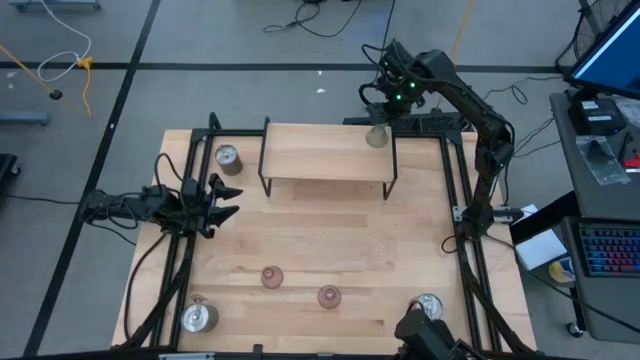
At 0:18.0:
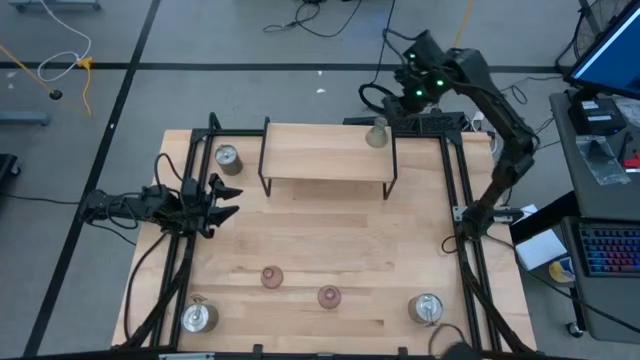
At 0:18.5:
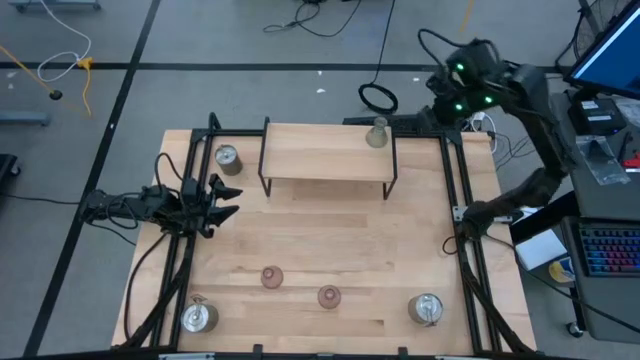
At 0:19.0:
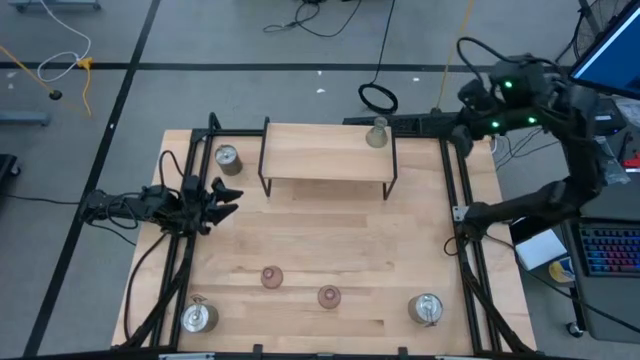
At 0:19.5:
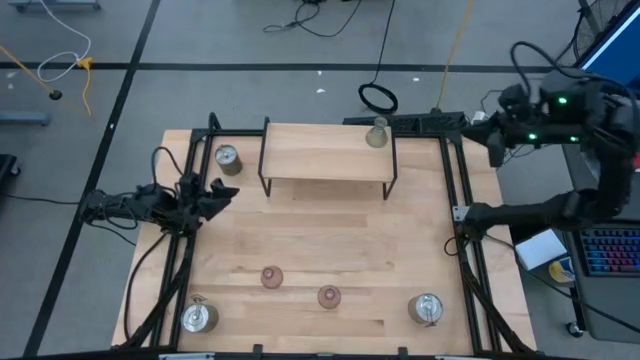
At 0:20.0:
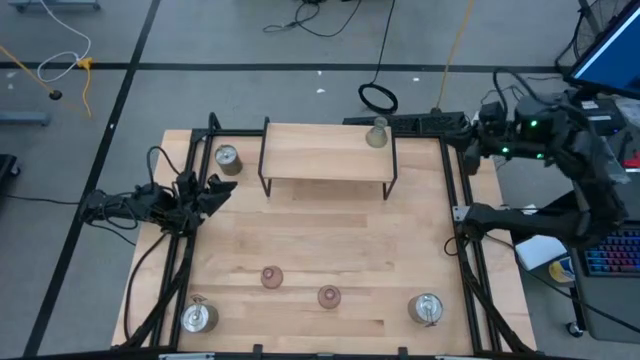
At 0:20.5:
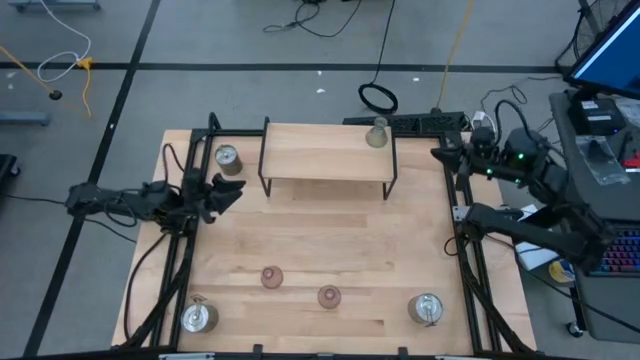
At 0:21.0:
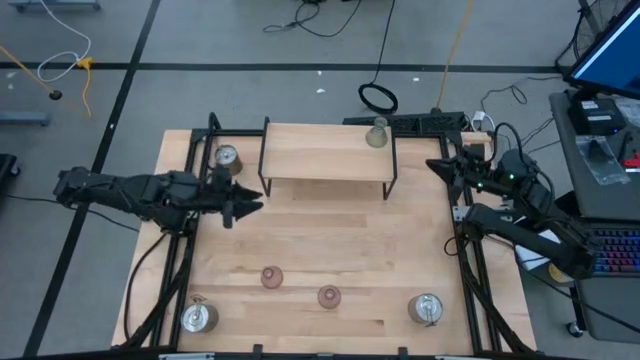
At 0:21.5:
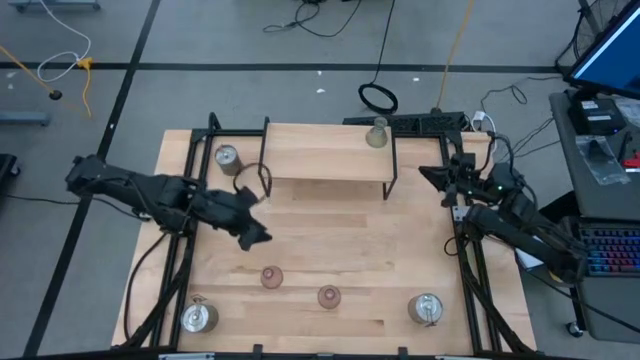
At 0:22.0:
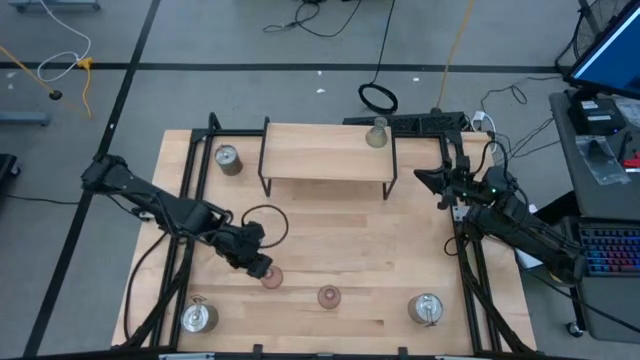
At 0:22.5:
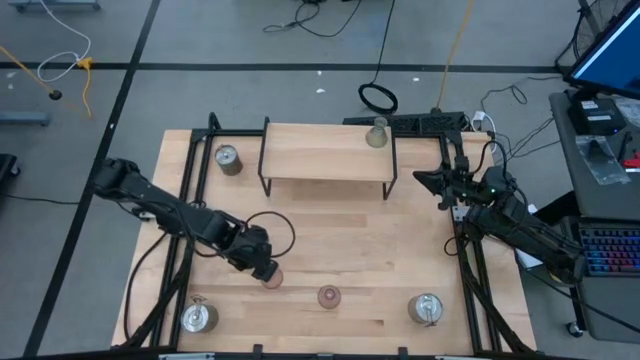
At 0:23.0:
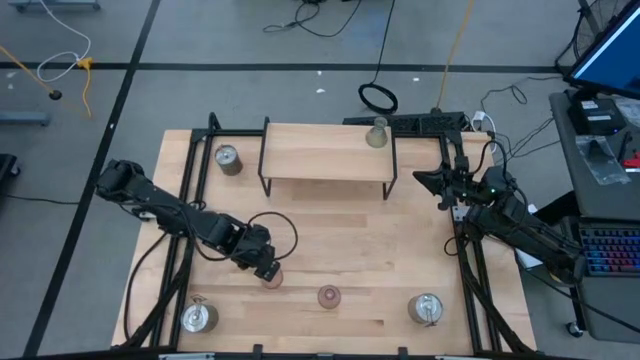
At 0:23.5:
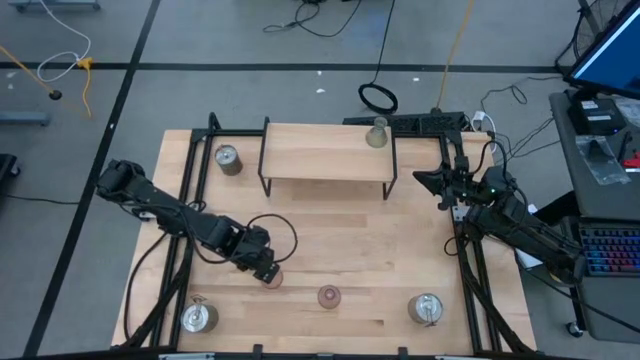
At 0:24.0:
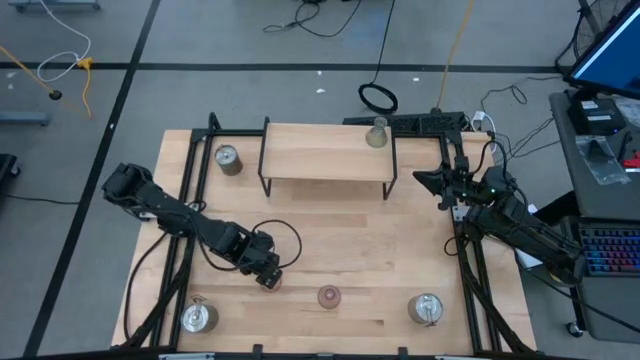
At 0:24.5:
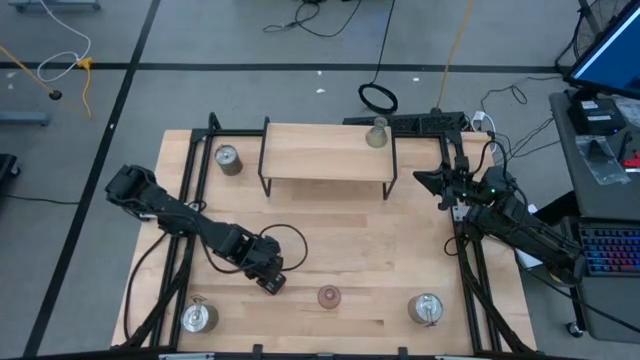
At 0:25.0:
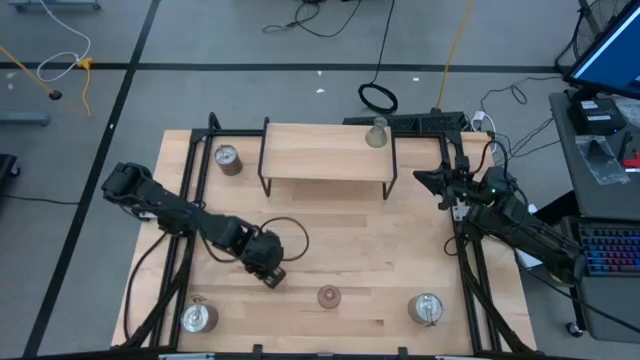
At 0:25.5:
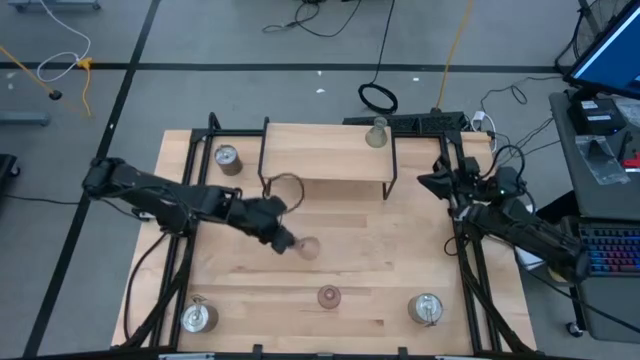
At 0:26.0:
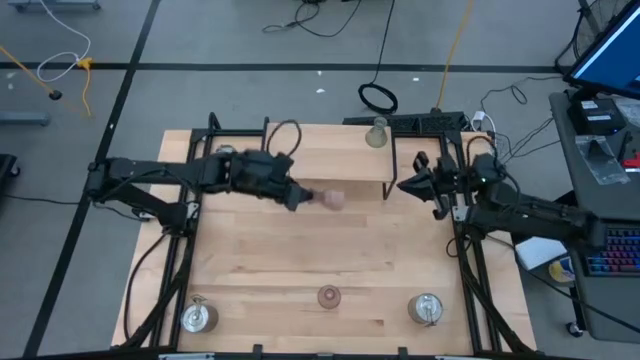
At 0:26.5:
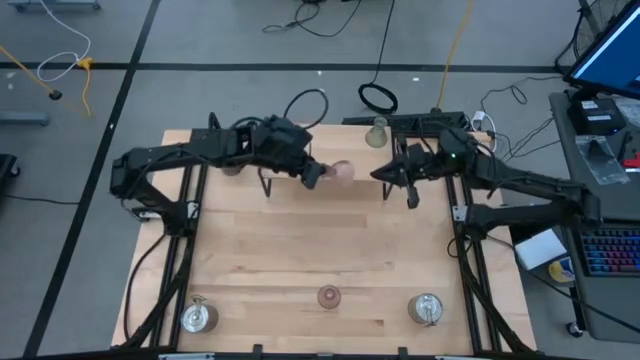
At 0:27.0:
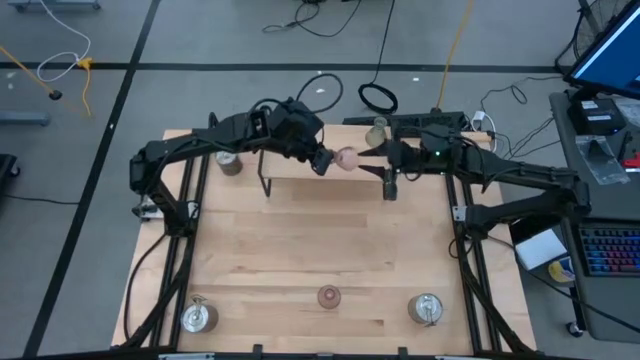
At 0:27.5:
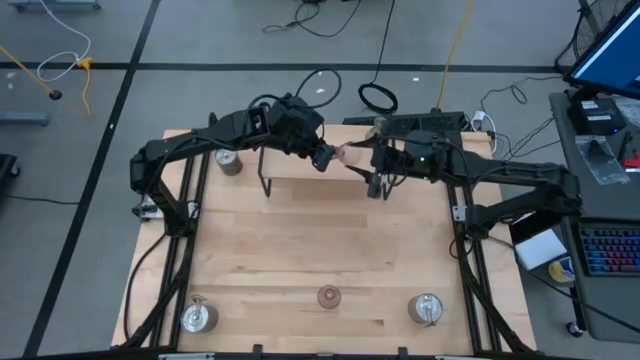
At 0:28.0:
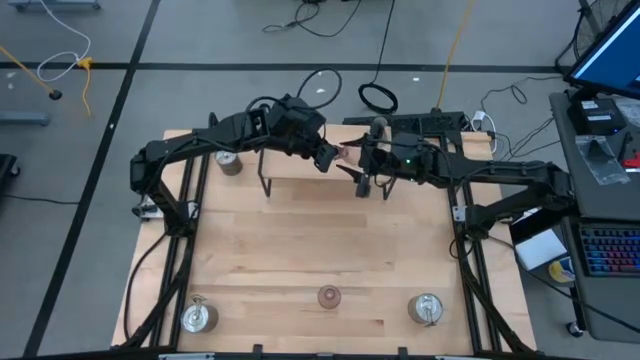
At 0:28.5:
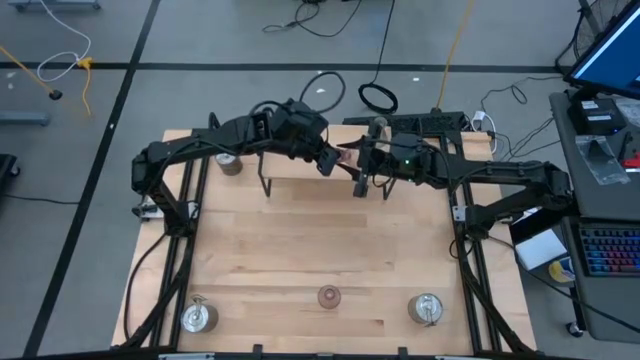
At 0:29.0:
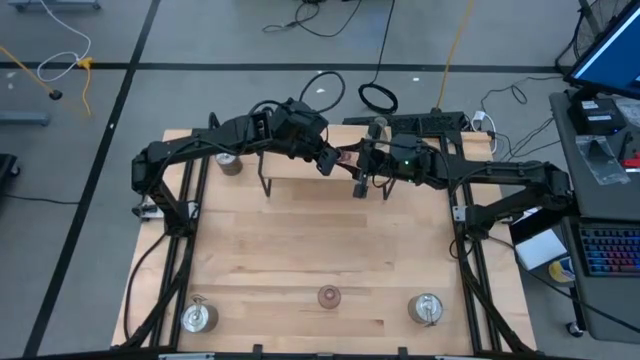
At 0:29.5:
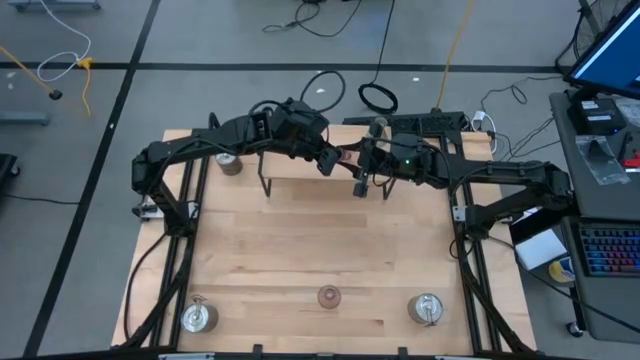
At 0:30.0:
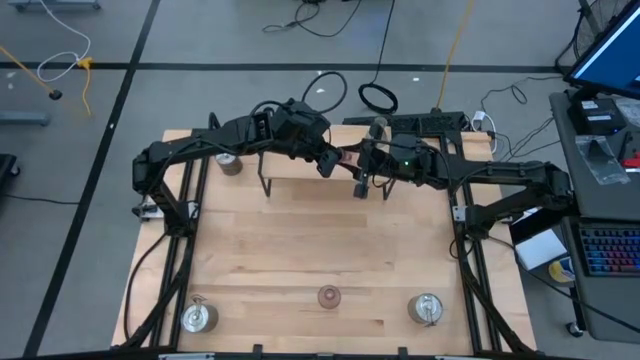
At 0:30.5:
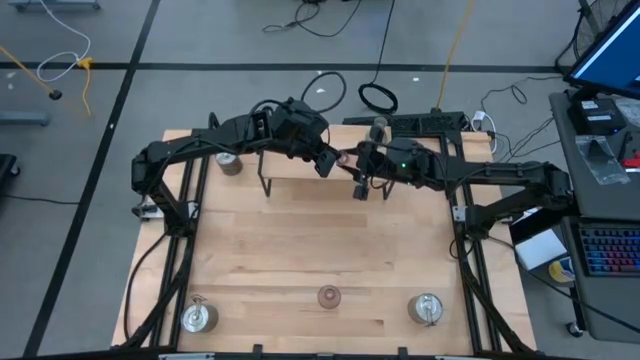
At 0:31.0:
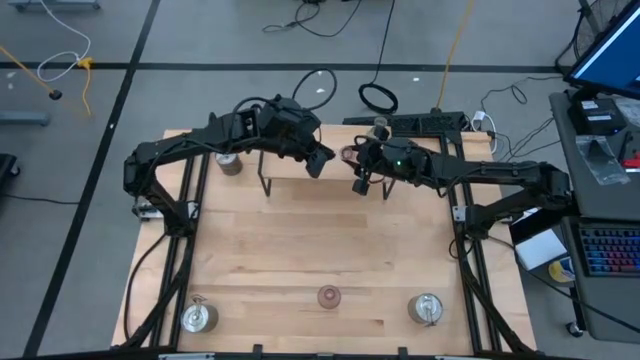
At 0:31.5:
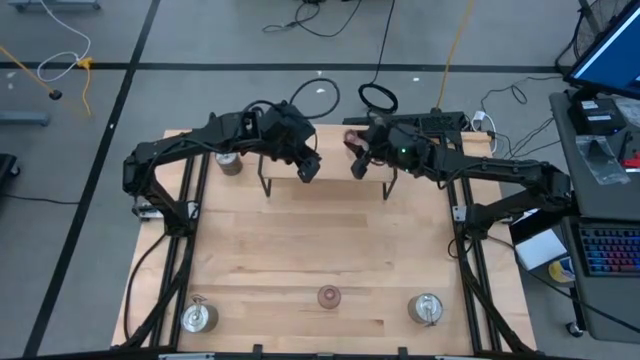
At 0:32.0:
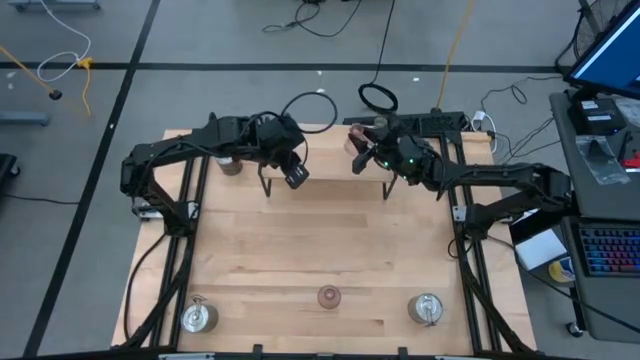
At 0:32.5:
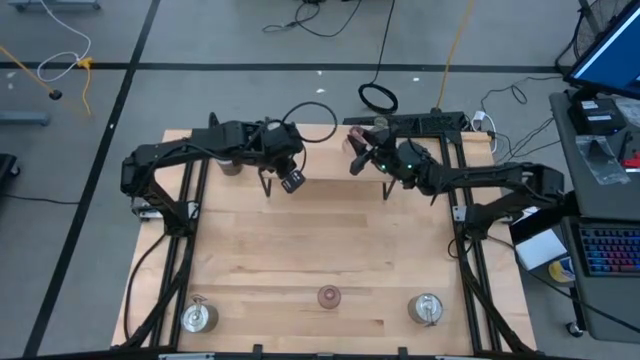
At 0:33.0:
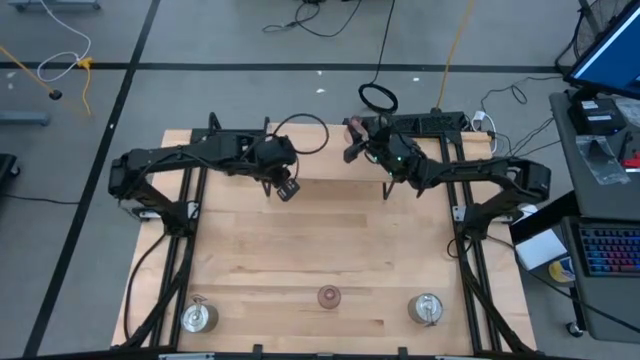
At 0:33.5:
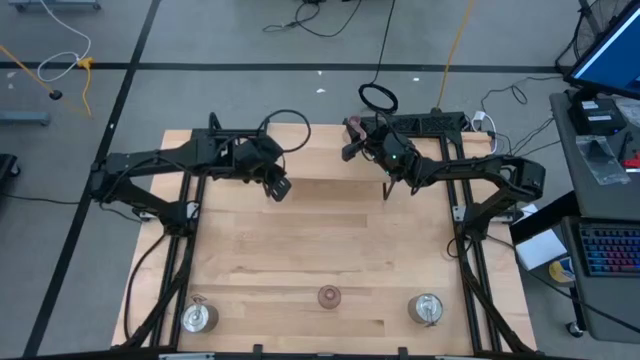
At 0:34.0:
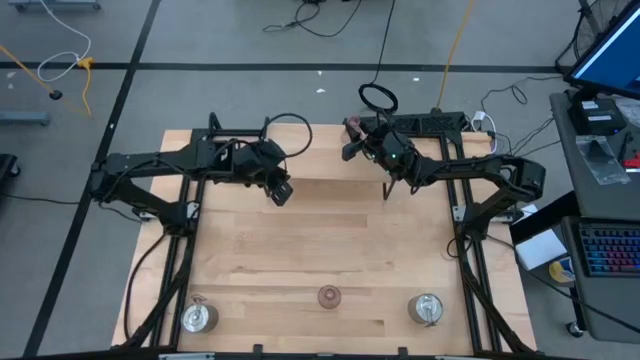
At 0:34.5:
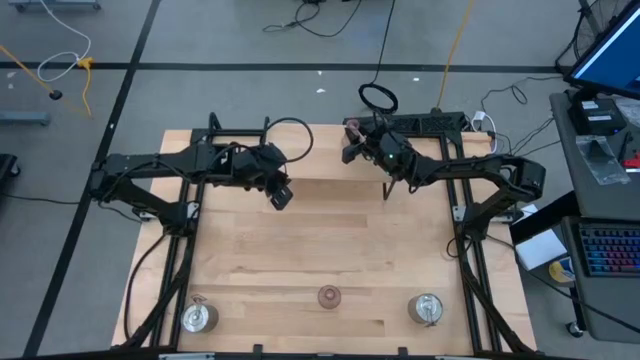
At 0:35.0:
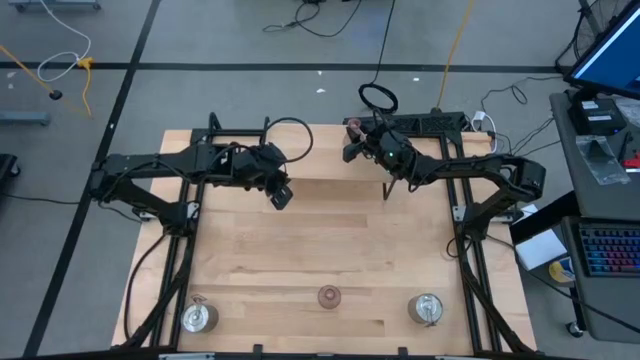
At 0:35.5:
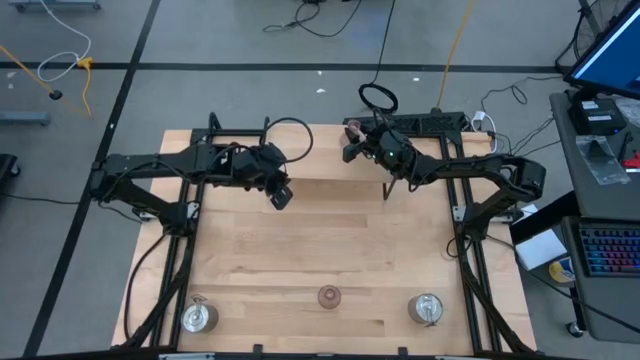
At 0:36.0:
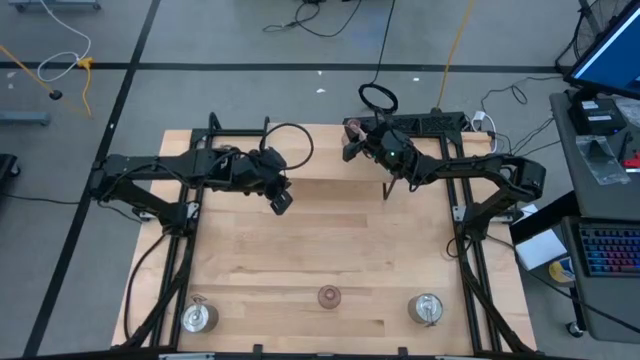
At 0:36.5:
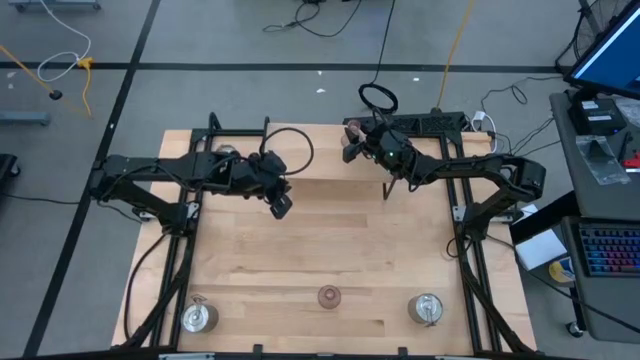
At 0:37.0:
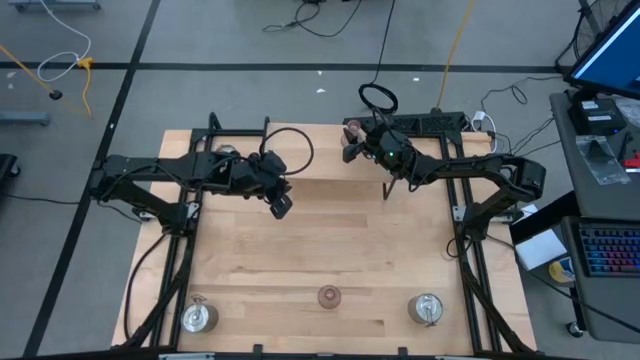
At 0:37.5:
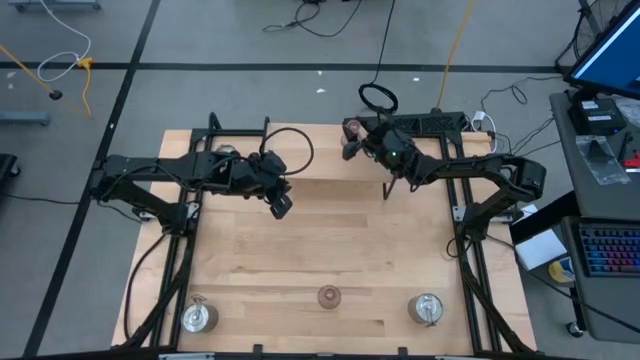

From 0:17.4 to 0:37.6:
Task: Pick & Place candle stick holders
Put the left pink candle holder on the shelf
